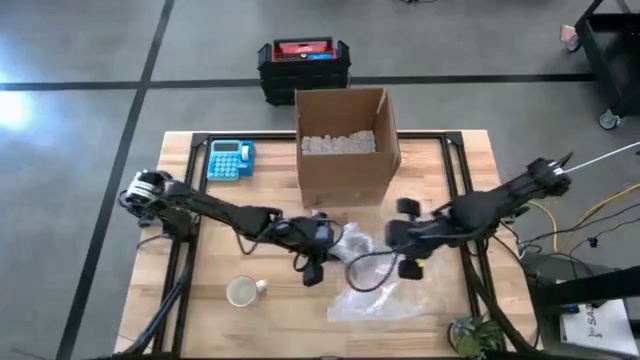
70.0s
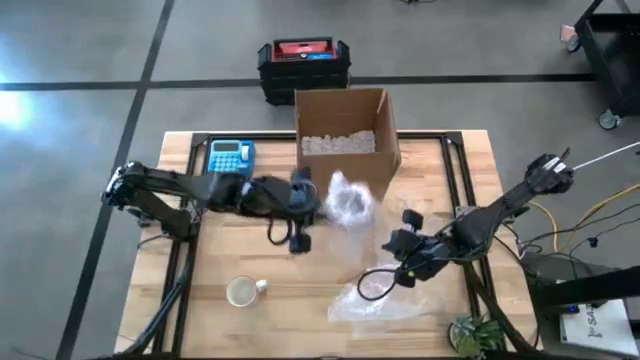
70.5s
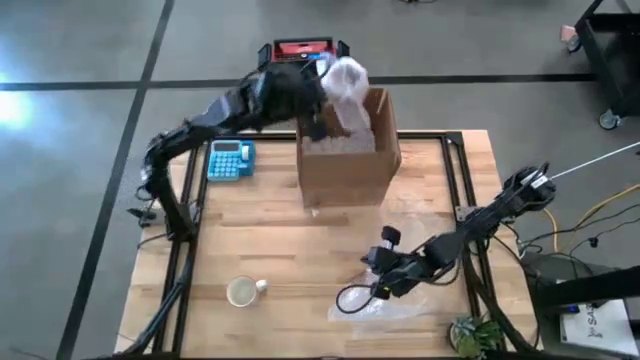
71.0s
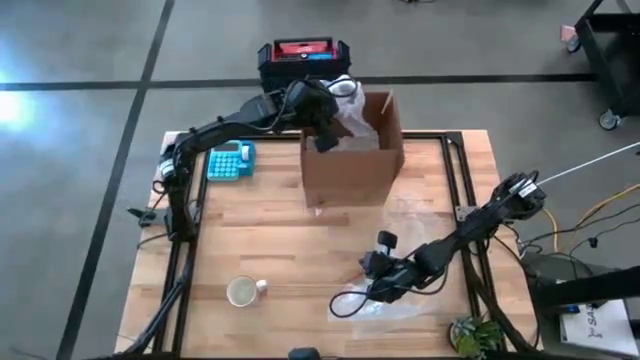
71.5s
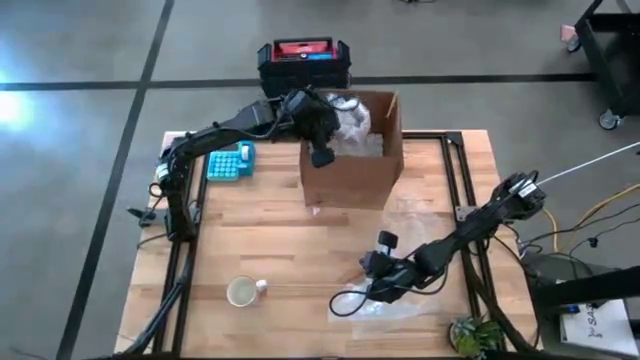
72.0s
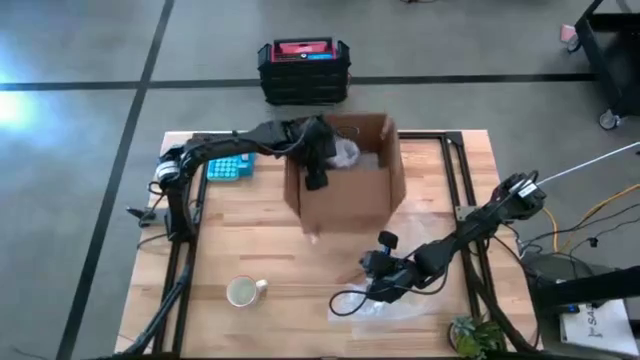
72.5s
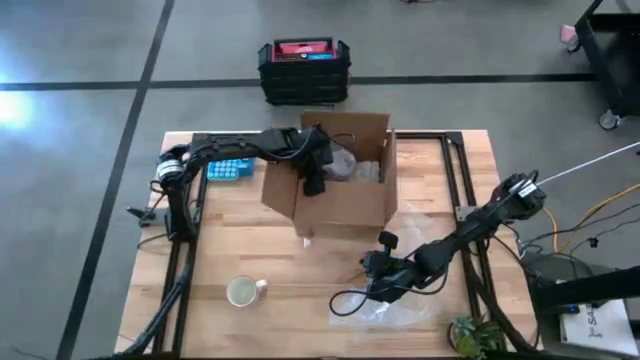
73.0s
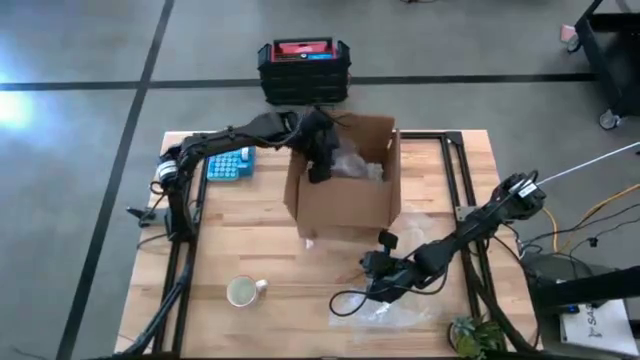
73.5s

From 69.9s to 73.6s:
Task: wrap mug
Put the wrapped purple mug into the cardboard box

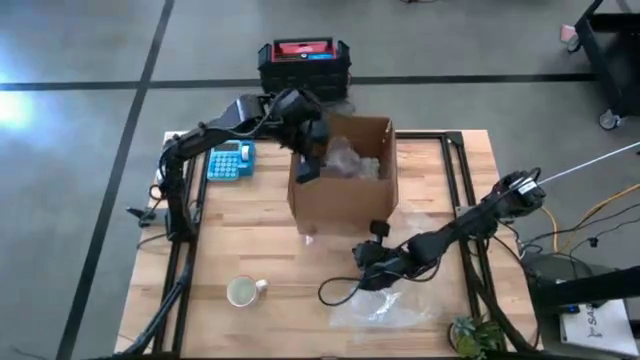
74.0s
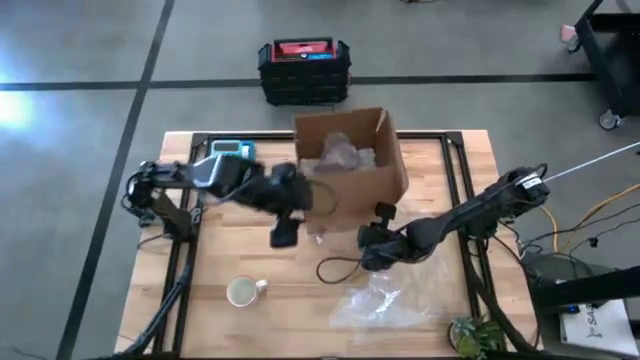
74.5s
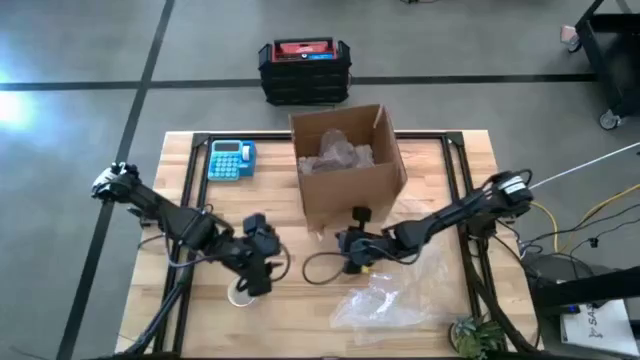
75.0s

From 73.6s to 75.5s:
Adjust the cardboard box

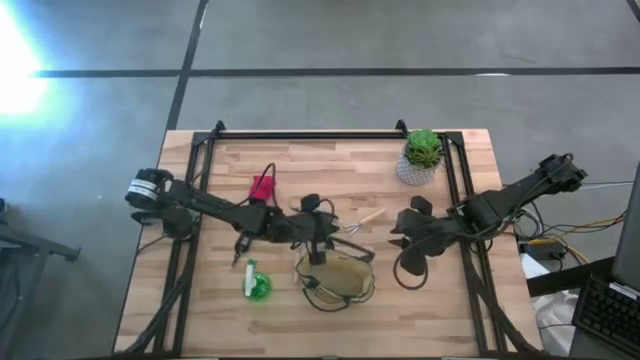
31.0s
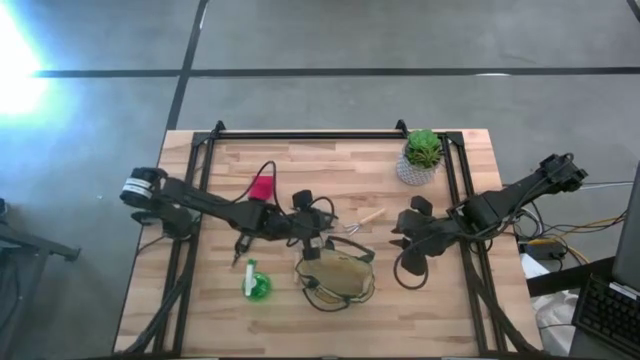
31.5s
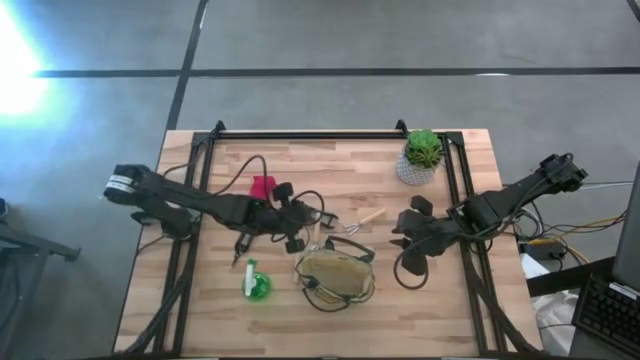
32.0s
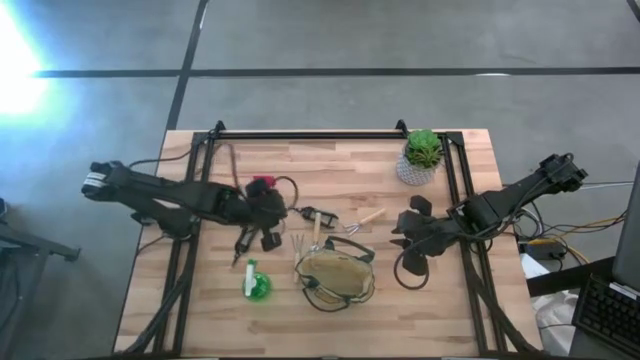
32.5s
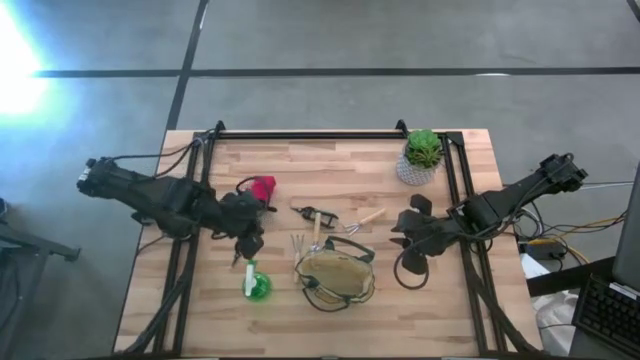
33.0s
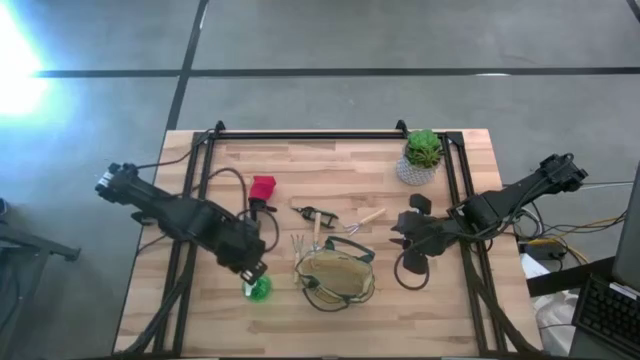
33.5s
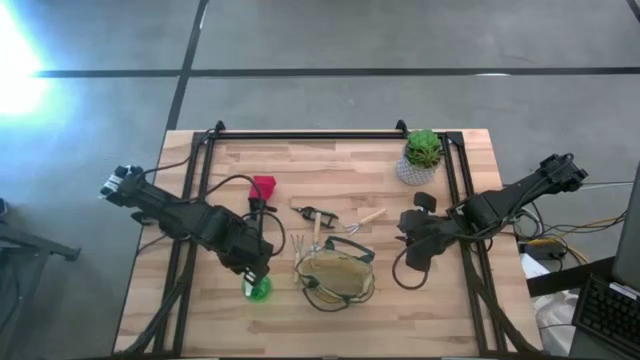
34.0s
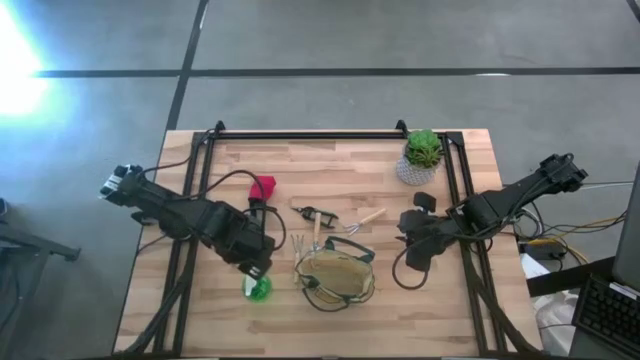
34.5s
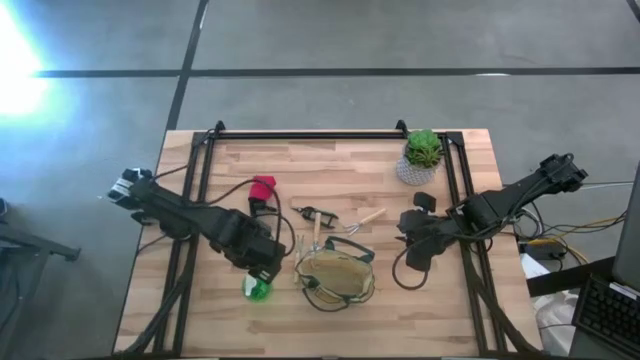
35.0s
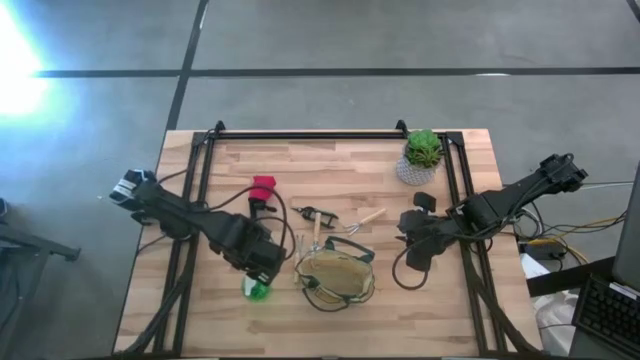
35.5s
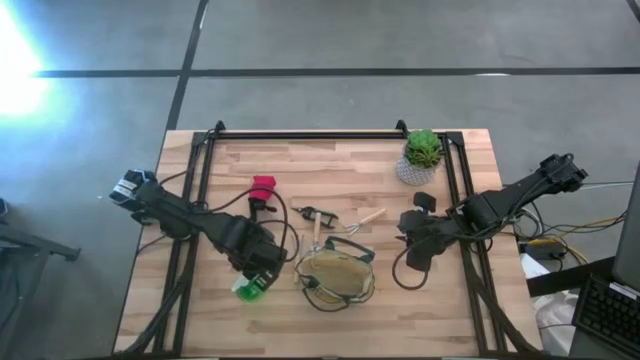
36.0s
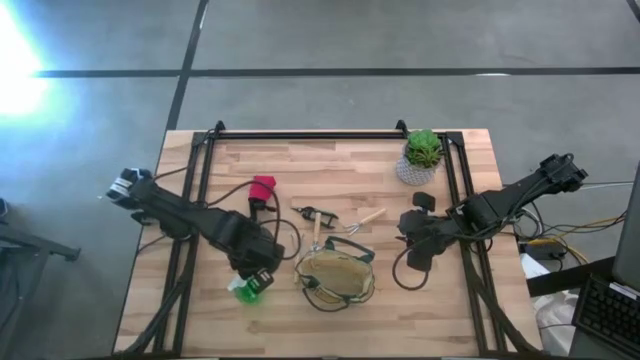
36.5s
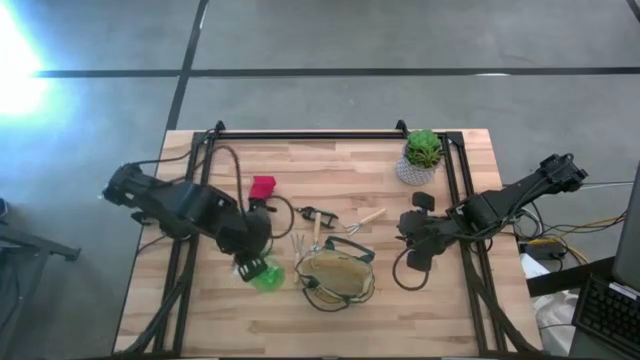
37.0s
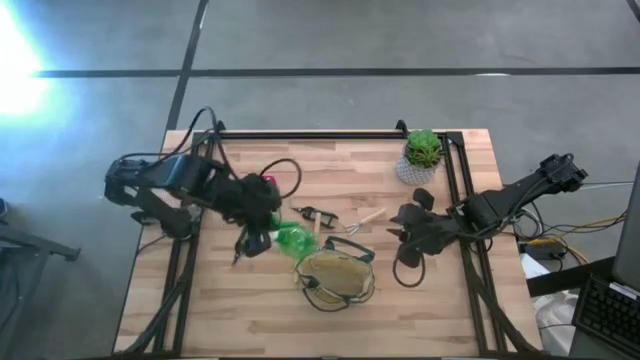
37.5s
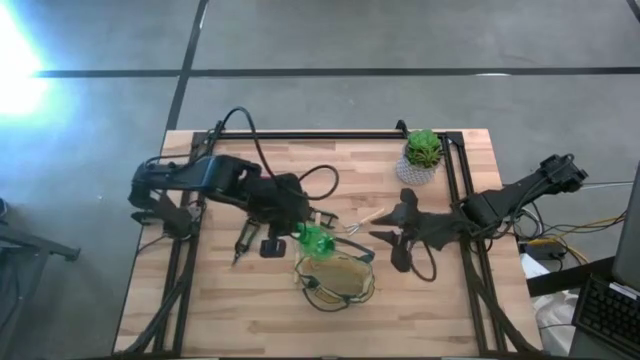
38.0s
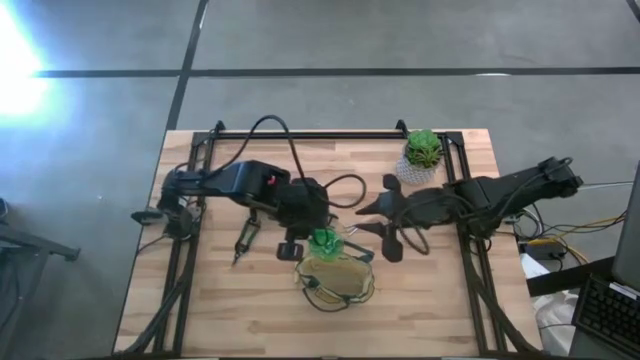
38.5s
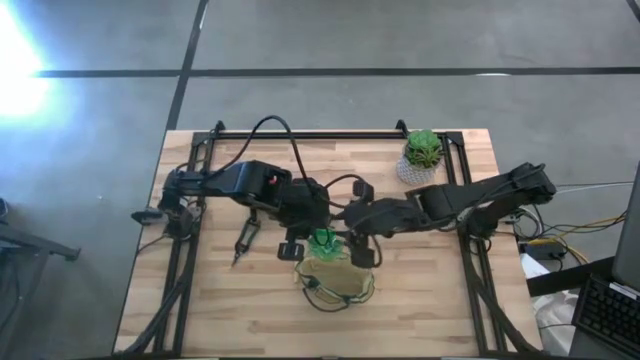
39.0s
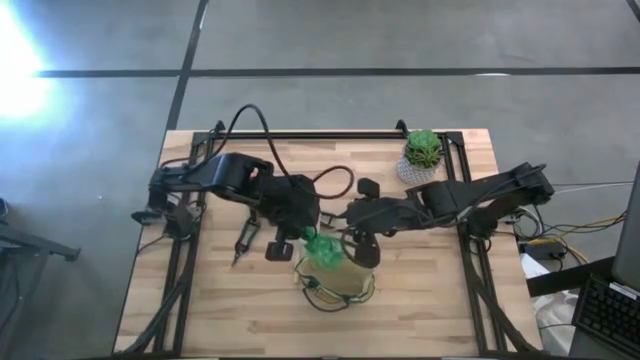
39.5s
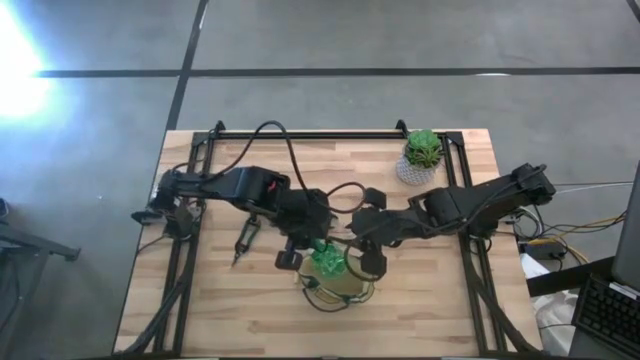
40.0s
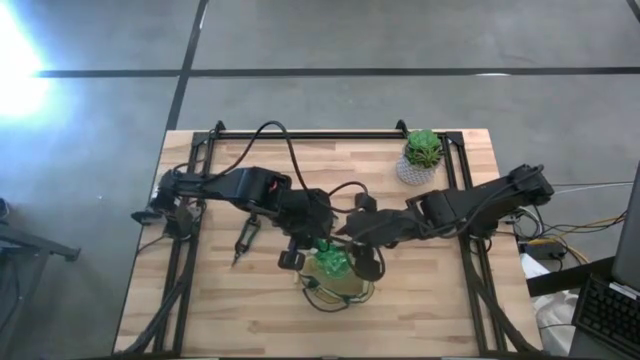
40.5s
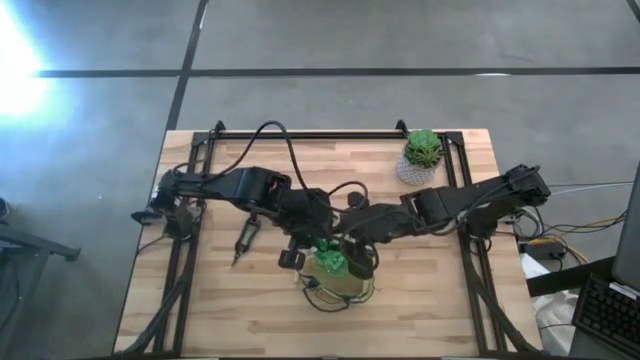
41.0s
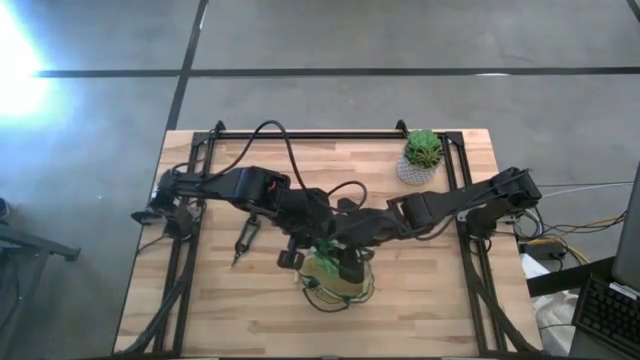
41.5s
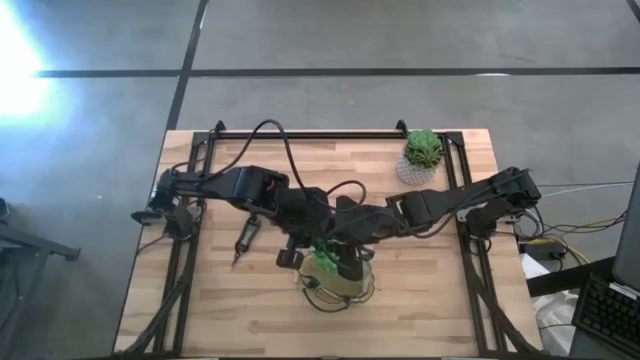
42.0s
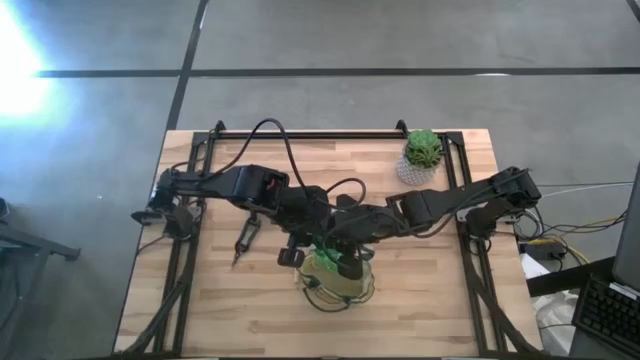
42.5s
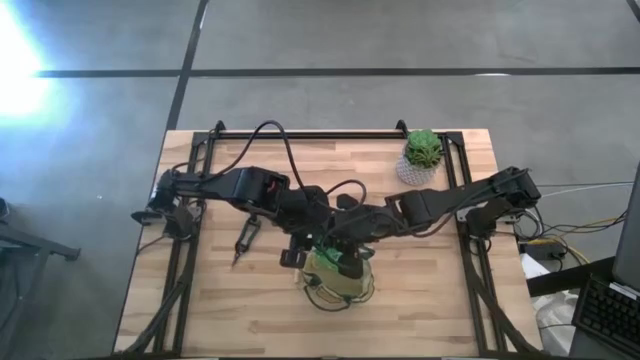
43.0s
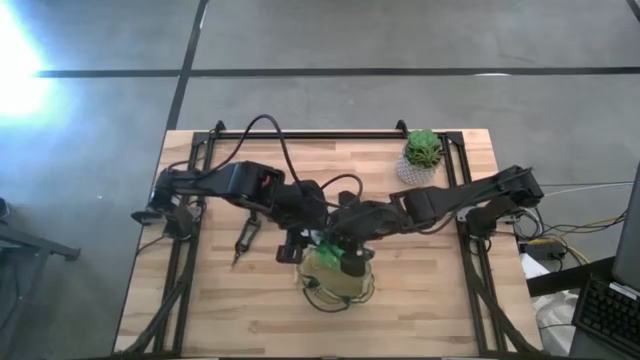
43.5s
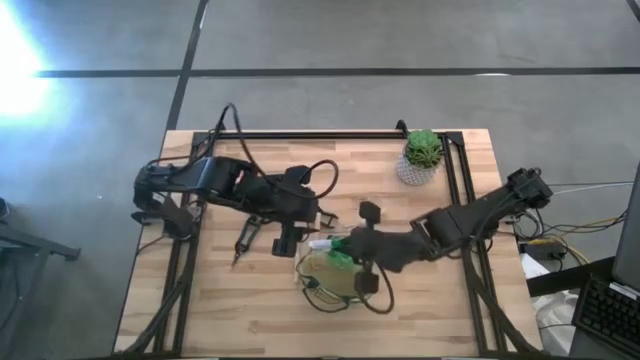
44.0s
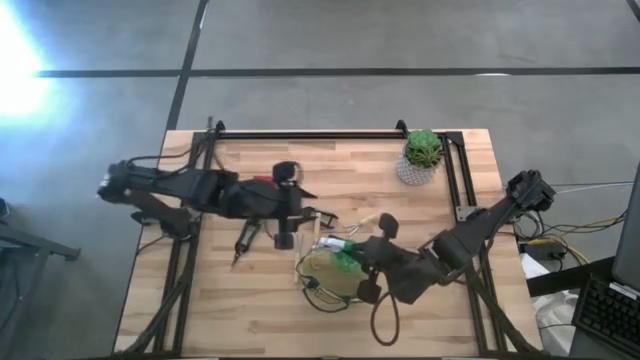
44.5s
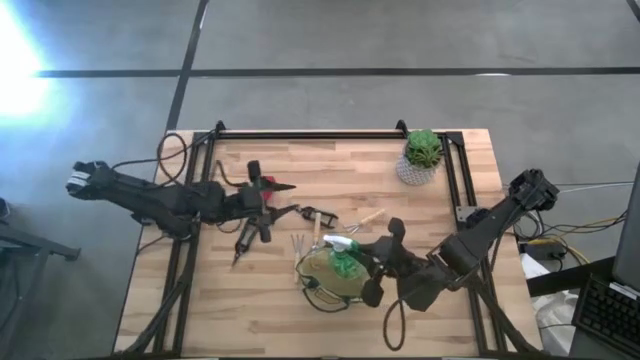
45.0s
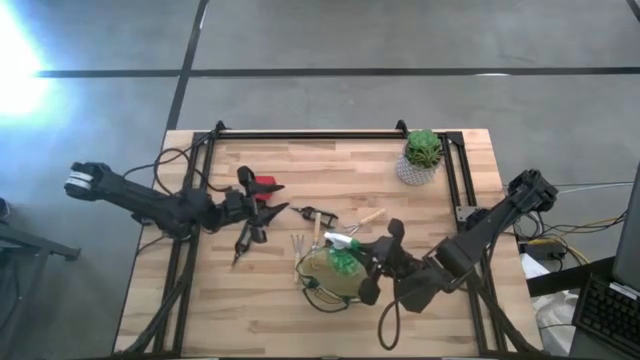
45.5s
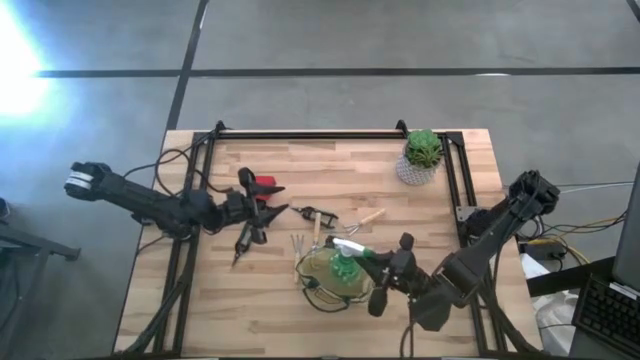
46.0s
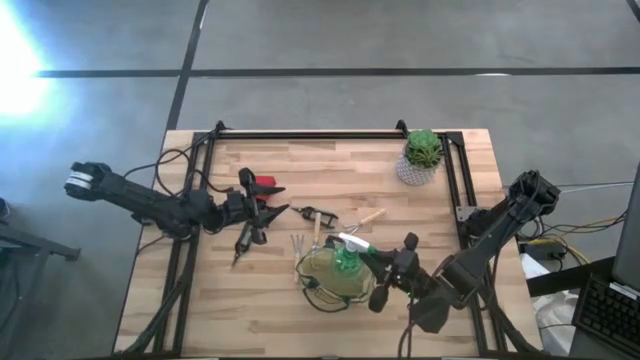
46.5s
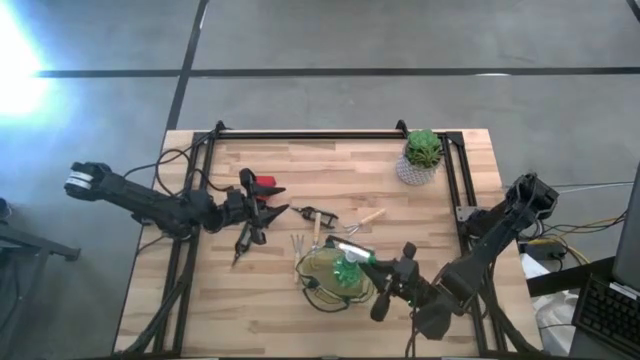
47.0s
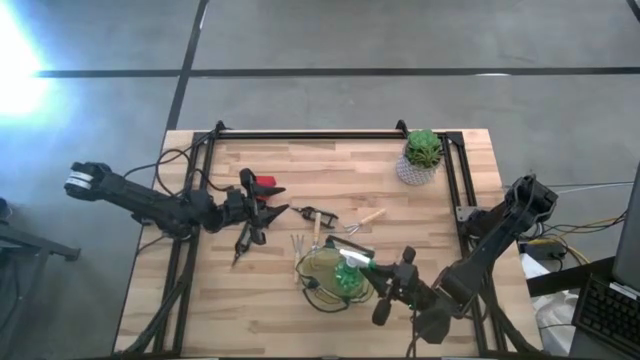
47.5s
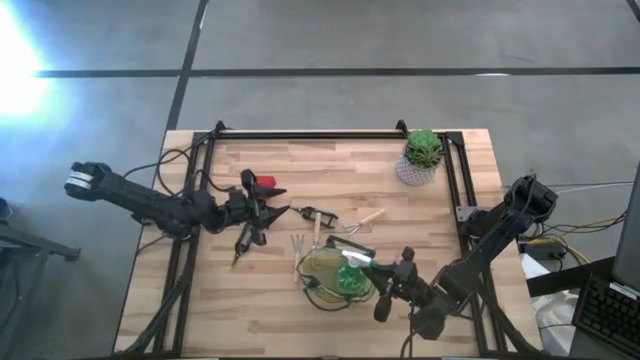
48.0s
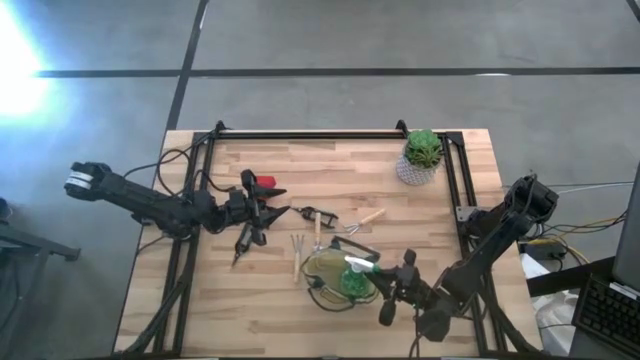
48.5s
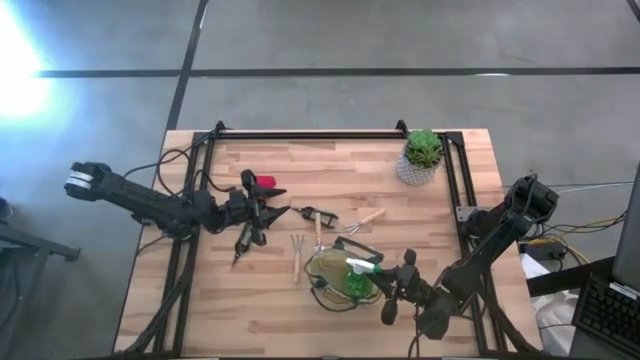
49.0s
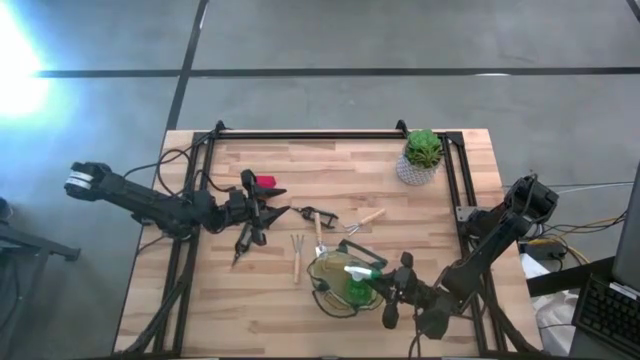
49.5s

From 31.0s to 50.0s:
Task: Pick & Place Garden tools in Gardening bag
Put the green spray bottle into the white gardening bag
